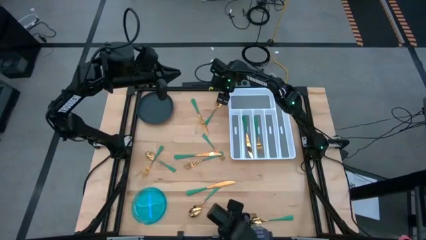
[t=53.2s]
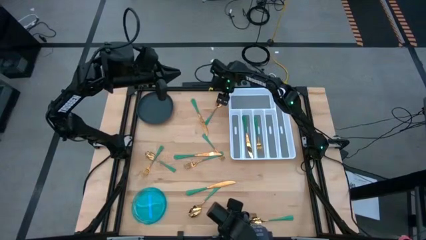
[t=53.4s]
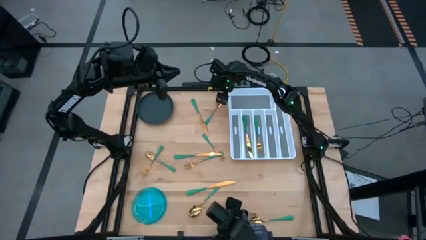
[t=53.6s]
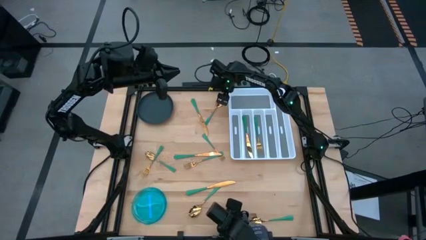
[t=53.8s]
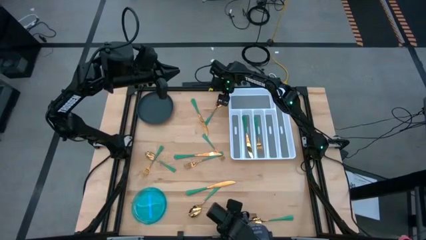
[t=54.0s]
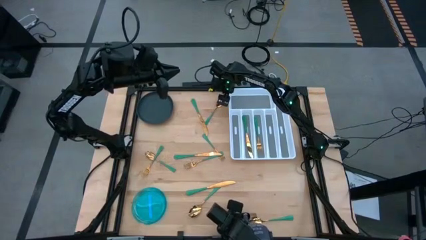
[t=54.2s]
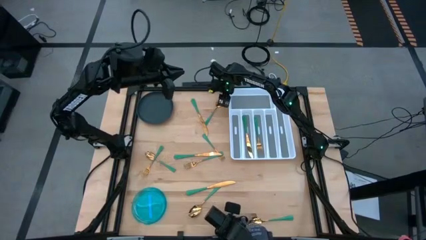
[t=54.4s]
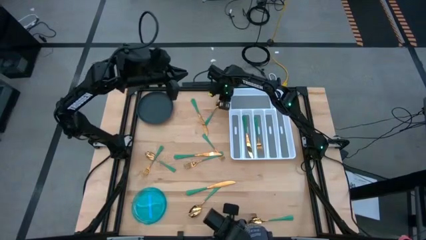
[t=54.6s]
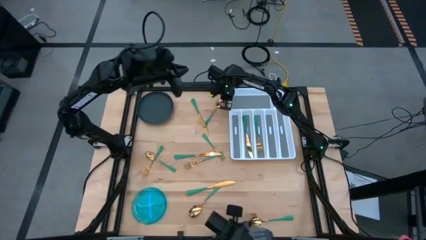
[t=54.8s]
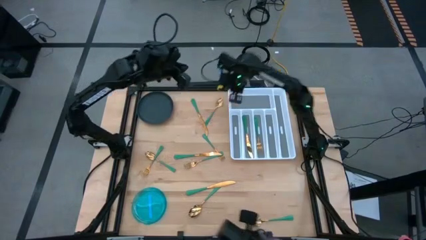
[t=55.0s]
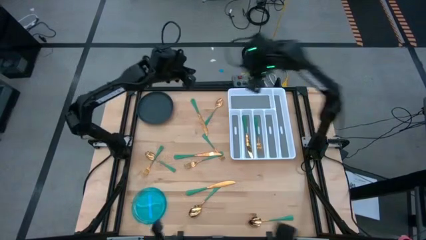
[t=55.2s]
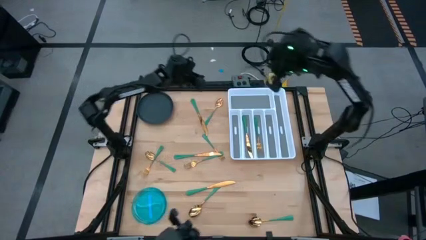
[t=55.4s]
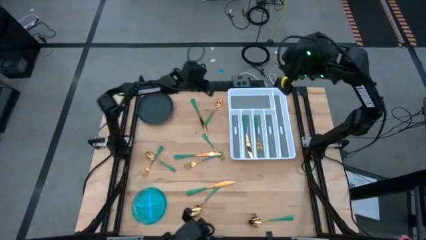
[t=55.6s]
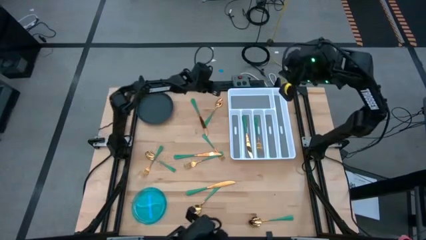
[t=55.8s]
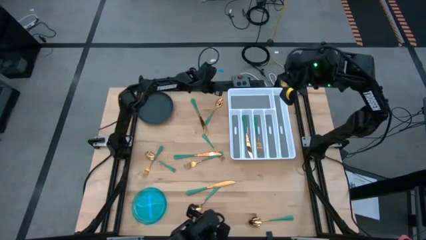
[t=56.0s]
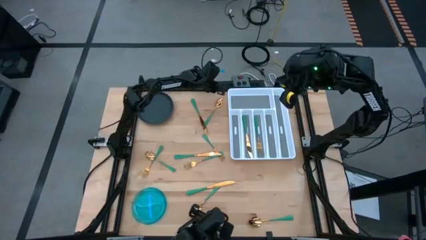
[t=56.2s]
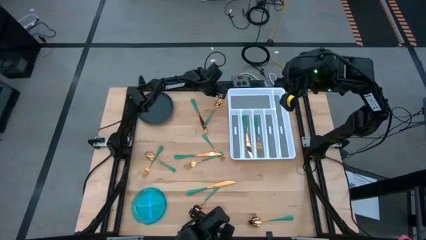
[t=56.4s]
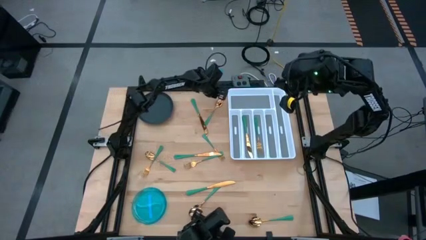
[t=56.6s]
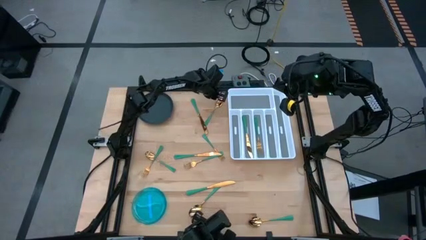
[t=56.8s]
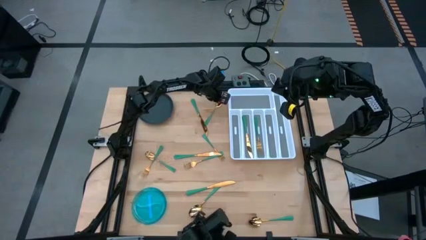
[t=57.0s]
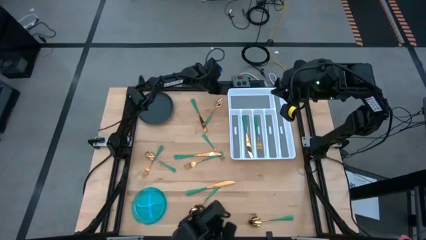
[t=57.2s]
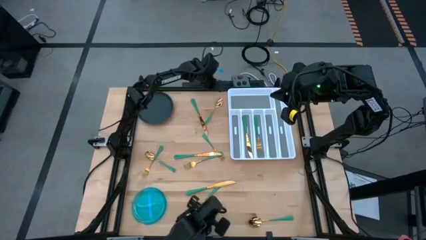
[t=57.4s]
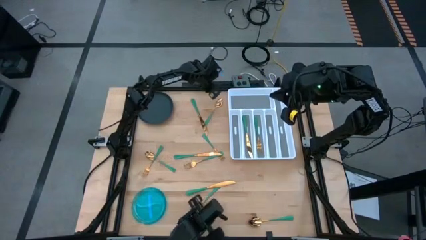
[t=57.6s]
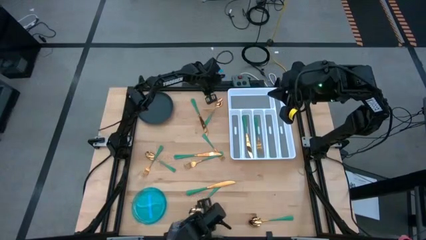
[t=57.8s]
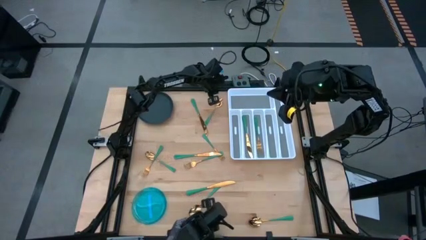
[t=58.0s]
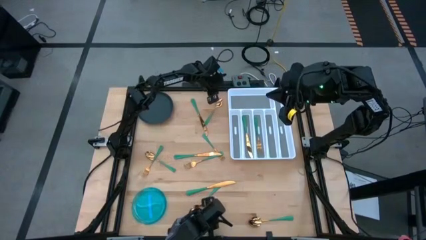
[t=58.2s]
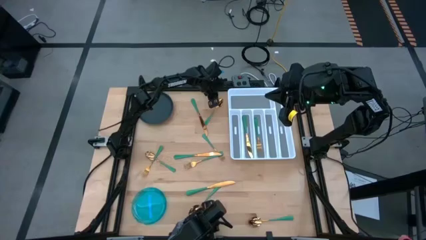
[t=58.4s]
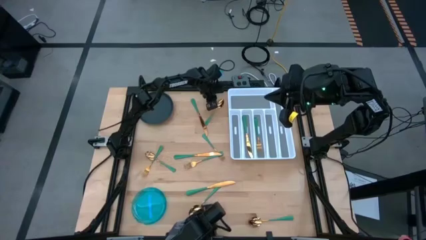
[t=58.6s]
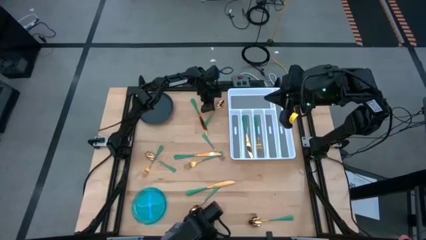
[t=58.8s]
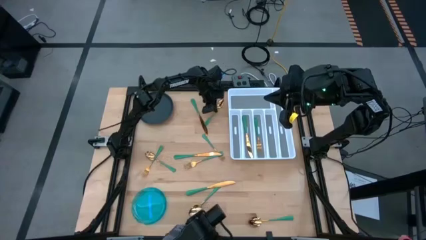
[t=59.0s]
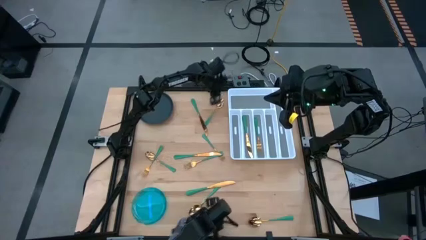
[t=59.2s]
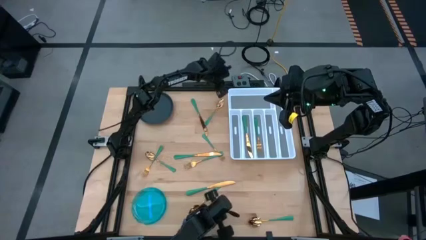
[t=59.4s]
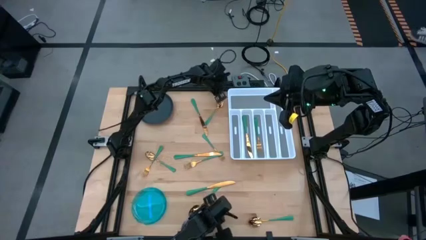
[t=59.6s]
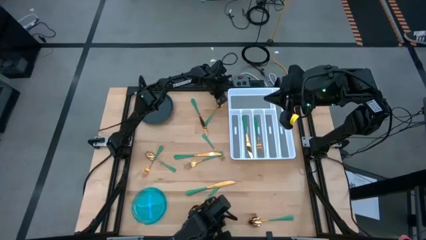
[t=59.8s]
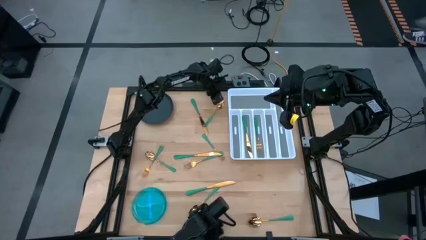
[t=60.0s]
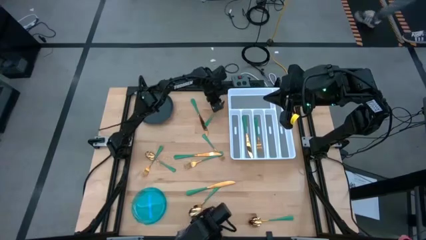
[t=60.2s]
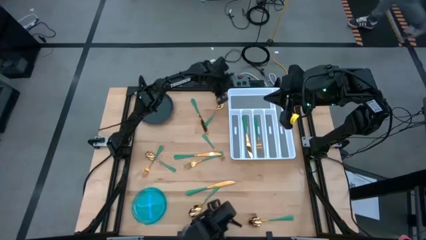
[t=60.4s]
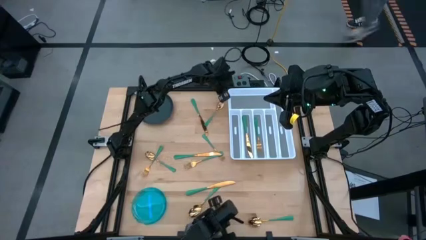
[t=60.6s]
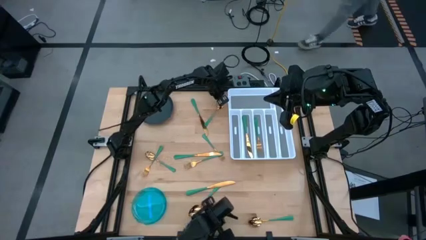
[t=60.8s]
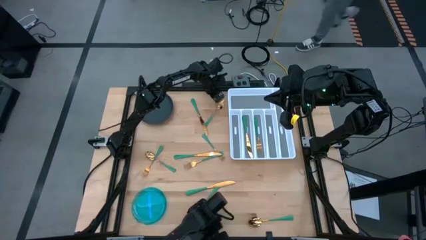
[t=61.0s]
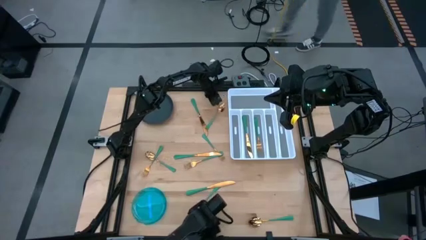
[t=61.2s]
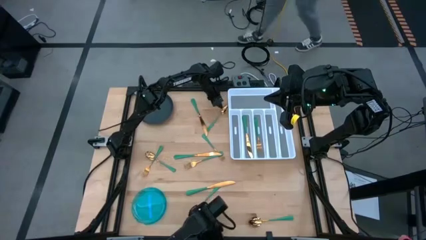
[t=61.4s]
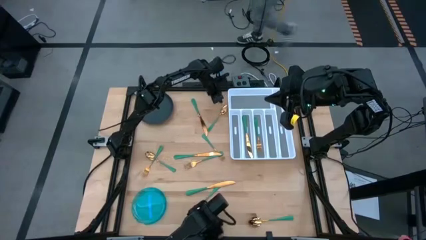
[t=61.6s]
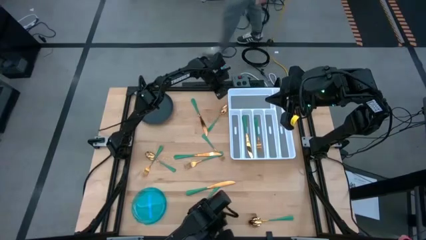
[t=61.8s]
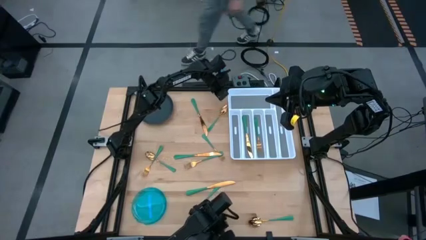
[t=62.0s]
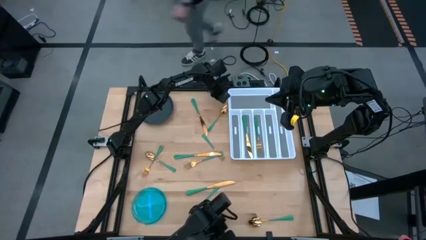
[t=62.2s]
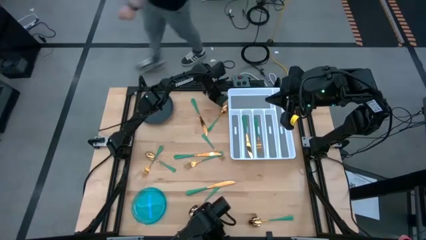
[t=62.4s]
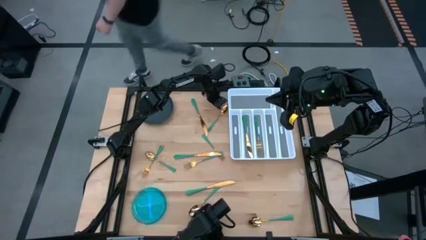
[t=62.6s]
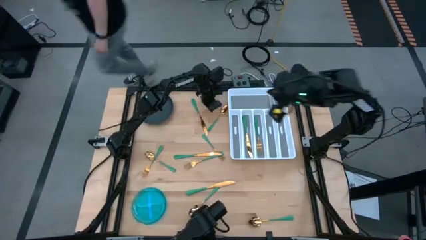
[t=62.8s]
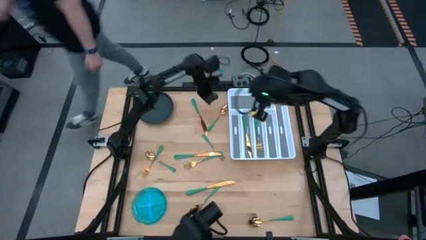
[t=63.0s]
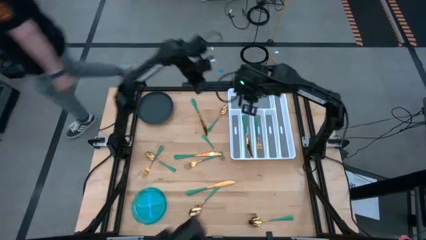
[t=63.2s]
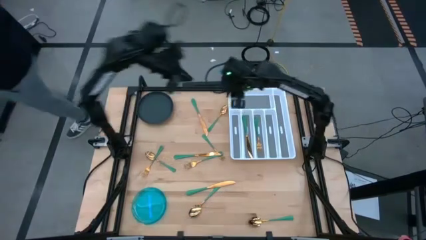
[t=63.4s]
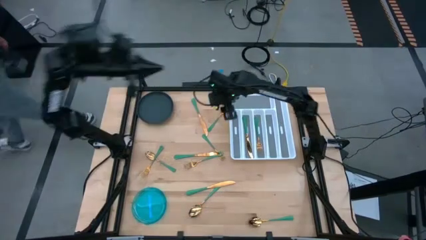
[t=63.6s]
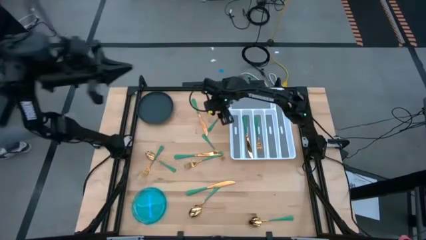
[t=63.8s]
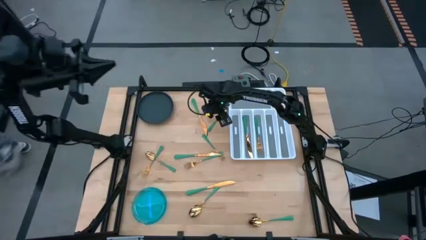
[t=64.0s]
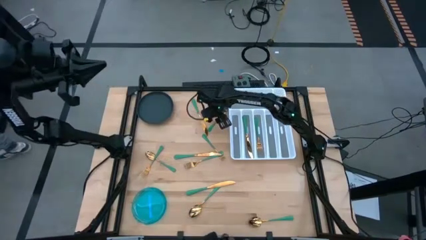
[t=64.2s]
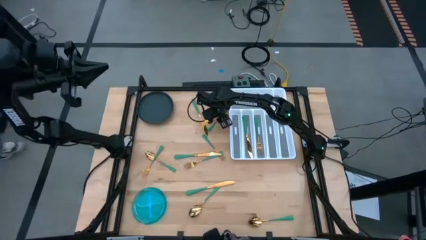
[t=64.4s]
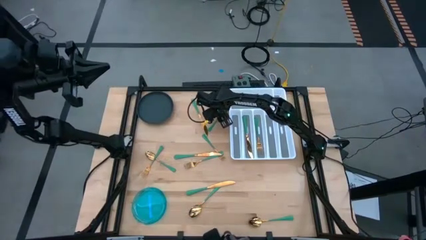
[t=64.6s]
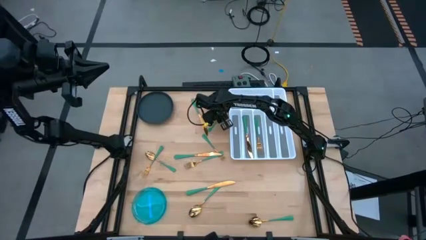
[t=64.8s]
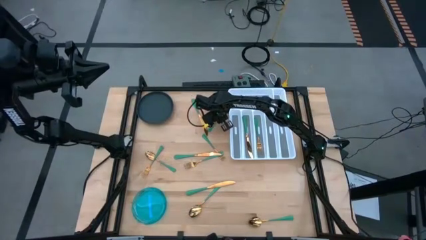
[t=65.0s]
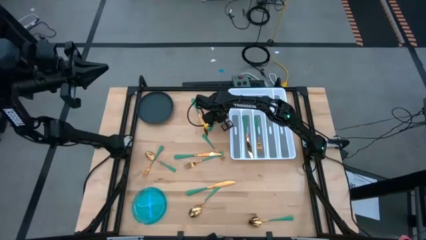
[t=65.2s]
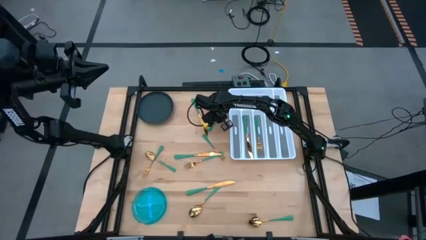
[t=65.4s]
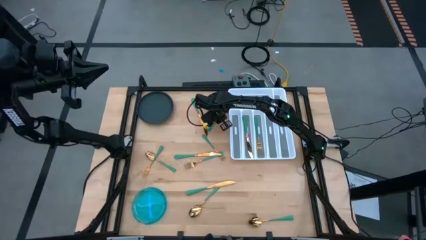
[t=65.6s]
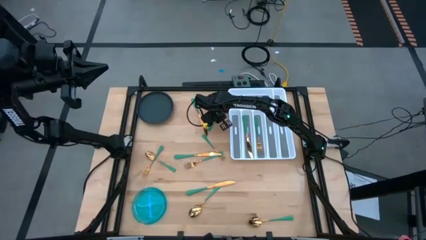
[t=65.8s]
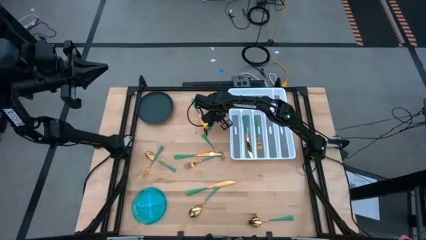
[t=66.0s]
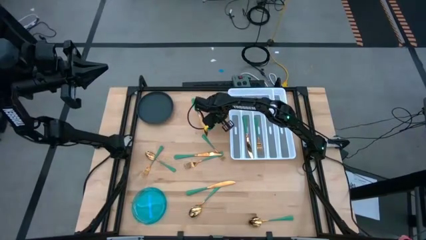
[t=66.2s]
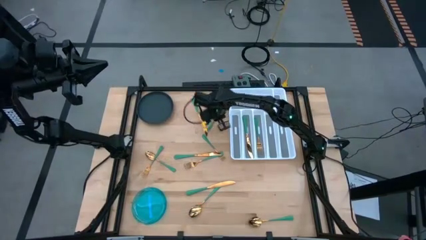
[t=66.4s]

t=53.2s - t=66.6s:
Task: Sort silverware
Put the top center green spoon into the left slot of the white silverware tray
